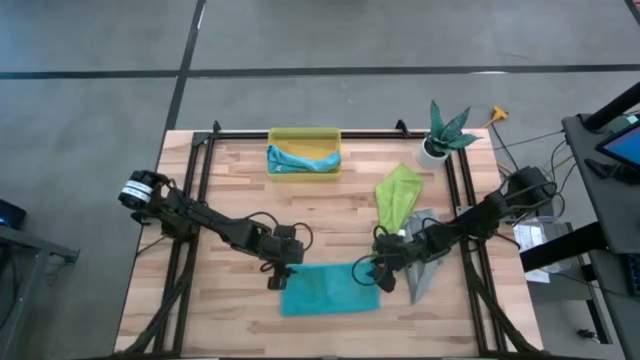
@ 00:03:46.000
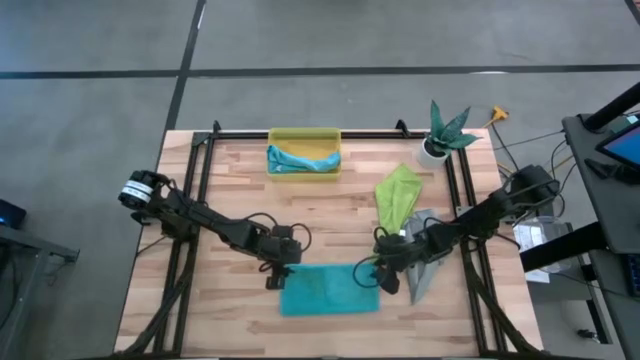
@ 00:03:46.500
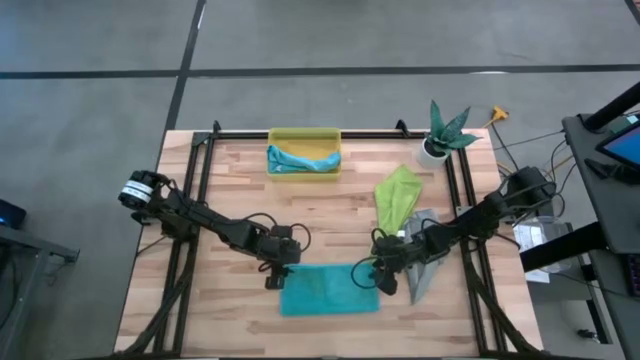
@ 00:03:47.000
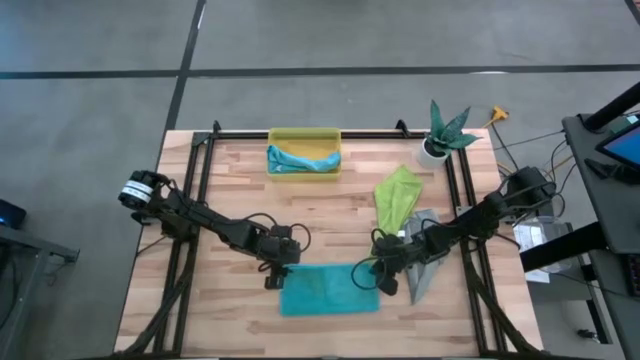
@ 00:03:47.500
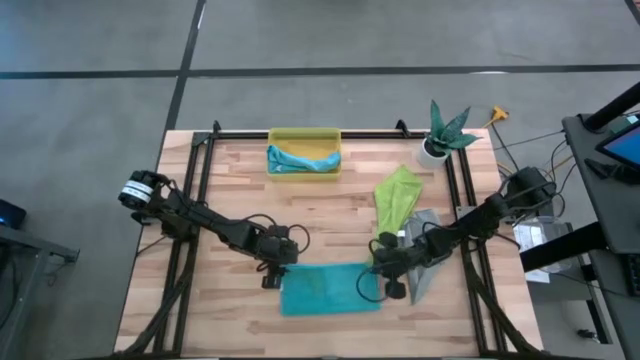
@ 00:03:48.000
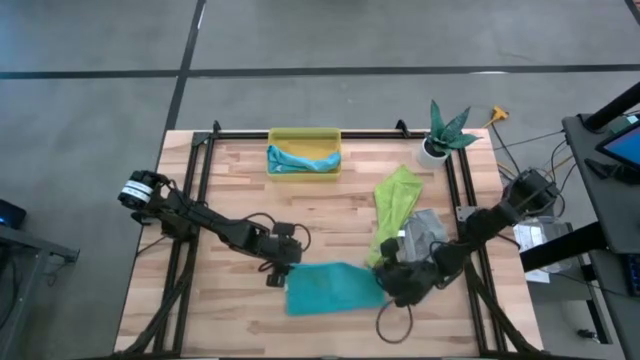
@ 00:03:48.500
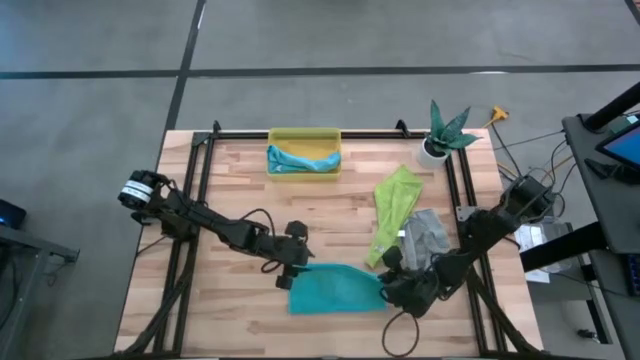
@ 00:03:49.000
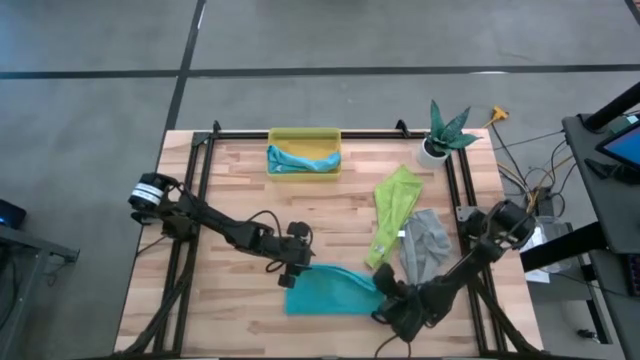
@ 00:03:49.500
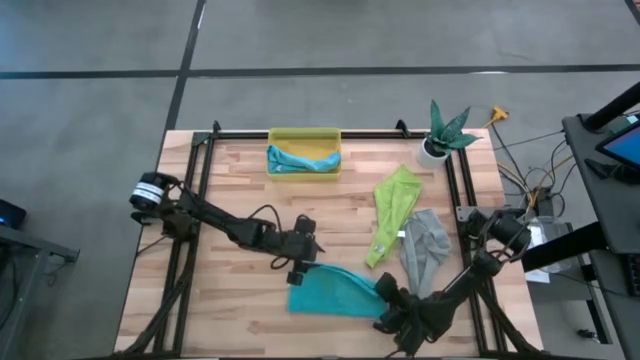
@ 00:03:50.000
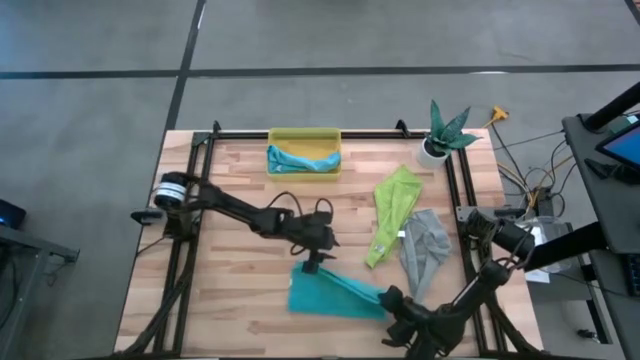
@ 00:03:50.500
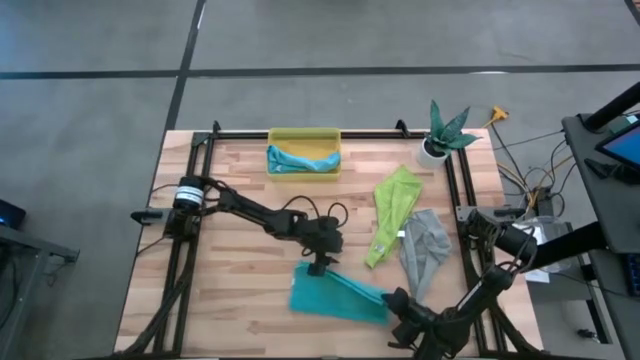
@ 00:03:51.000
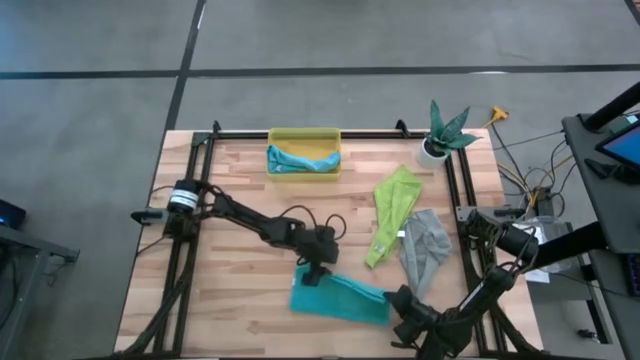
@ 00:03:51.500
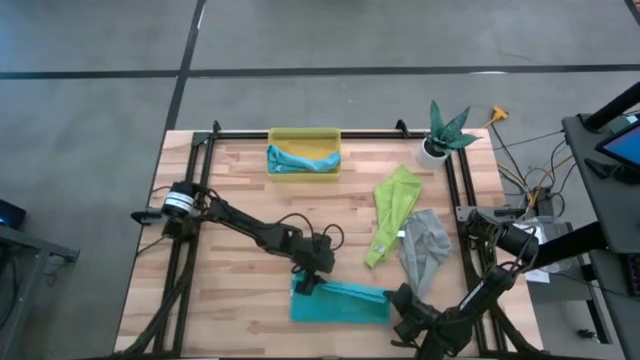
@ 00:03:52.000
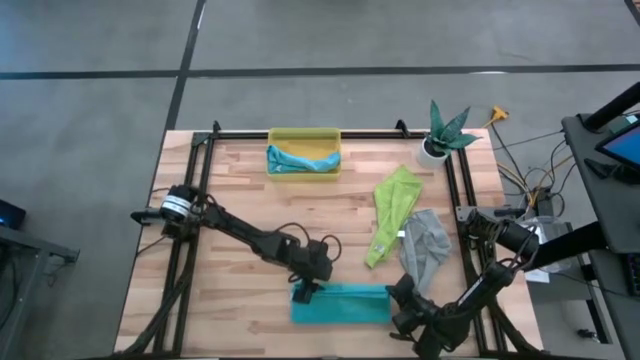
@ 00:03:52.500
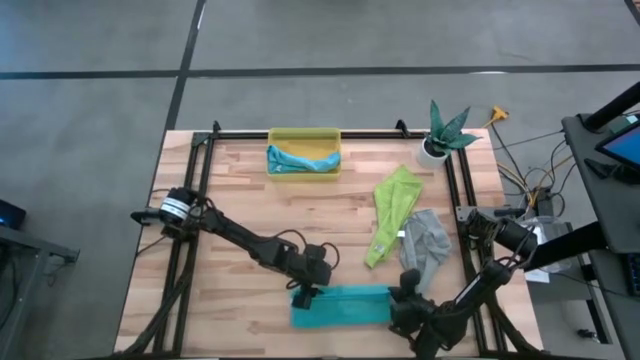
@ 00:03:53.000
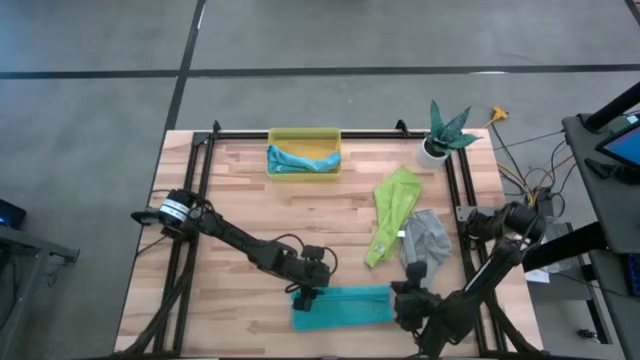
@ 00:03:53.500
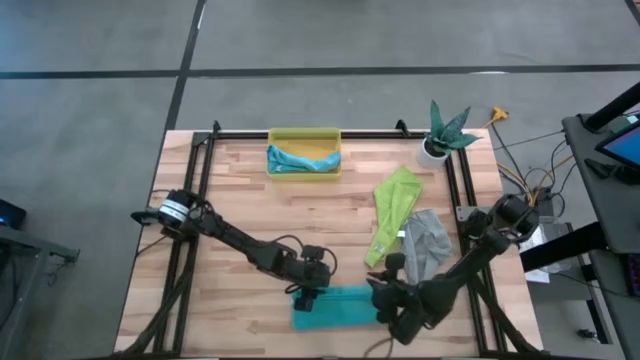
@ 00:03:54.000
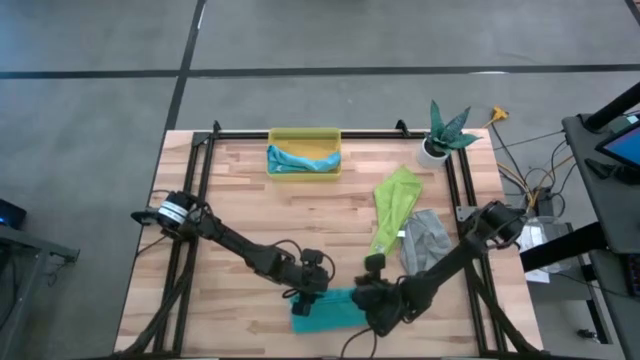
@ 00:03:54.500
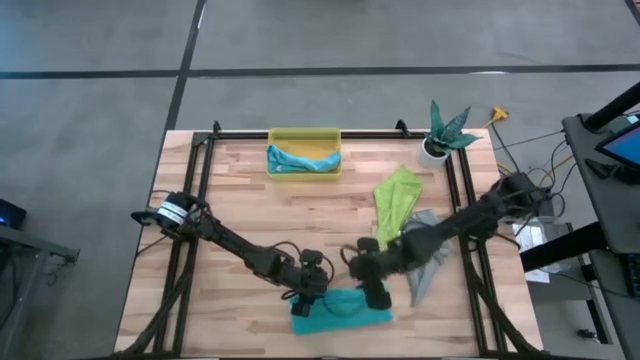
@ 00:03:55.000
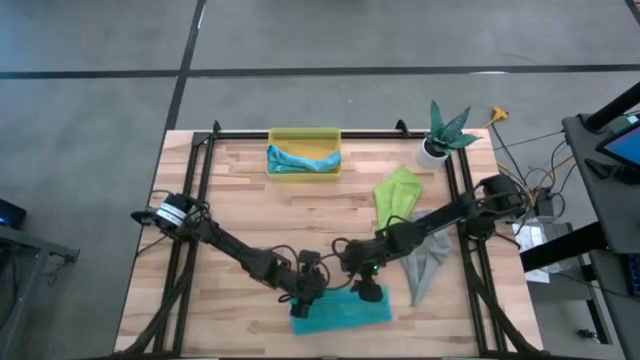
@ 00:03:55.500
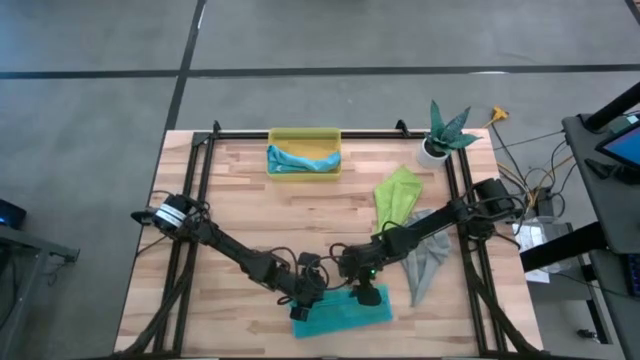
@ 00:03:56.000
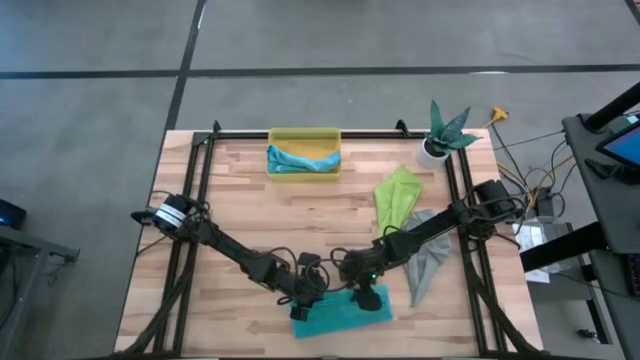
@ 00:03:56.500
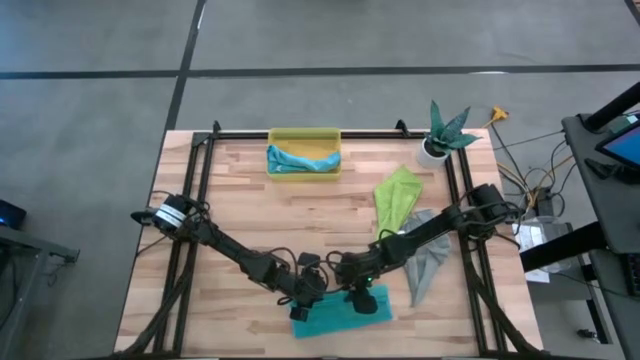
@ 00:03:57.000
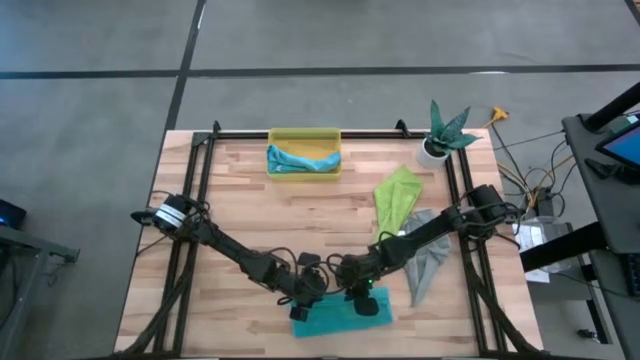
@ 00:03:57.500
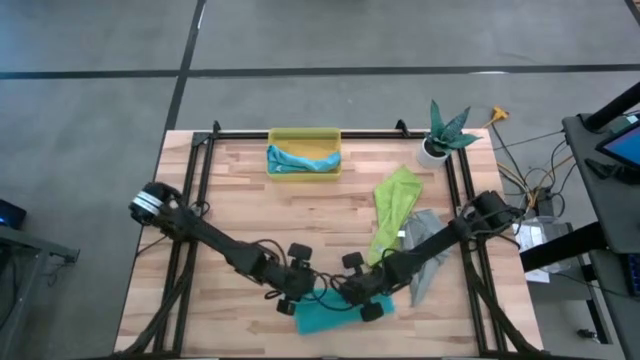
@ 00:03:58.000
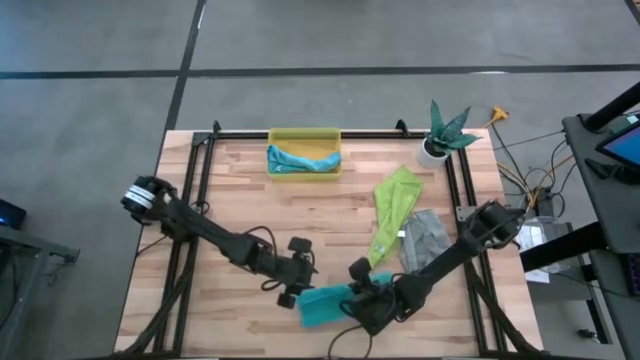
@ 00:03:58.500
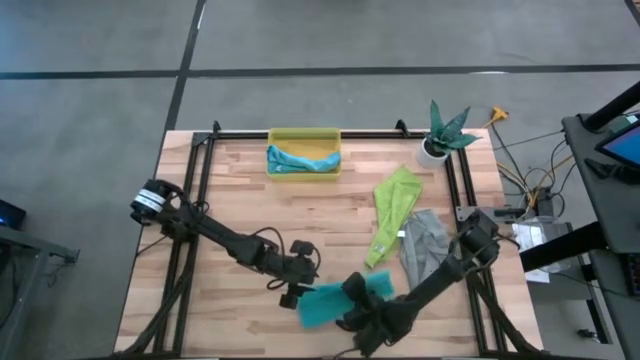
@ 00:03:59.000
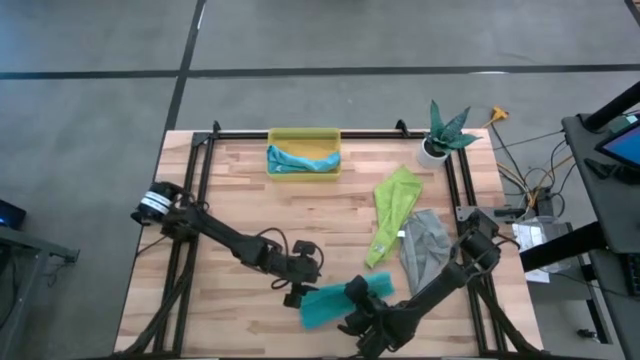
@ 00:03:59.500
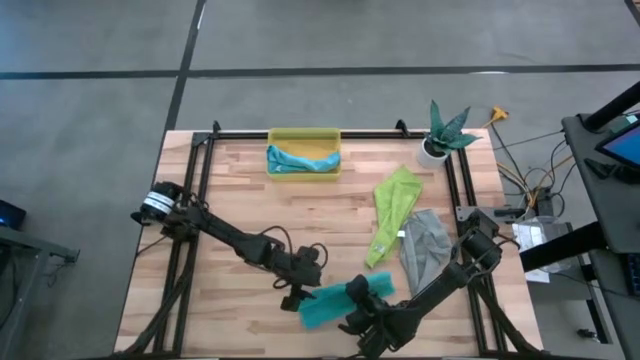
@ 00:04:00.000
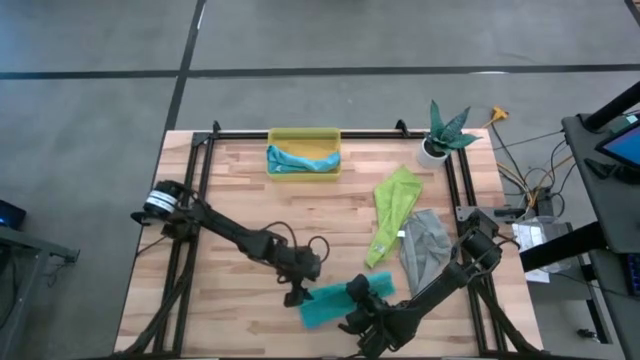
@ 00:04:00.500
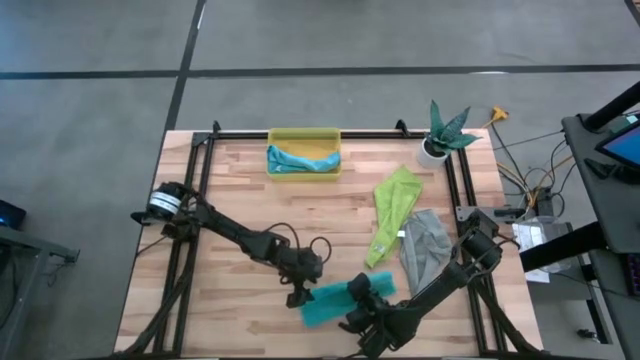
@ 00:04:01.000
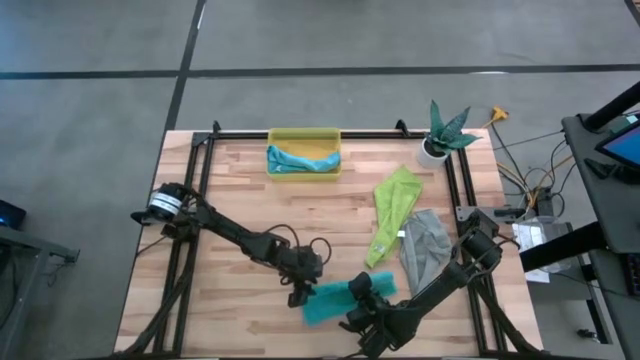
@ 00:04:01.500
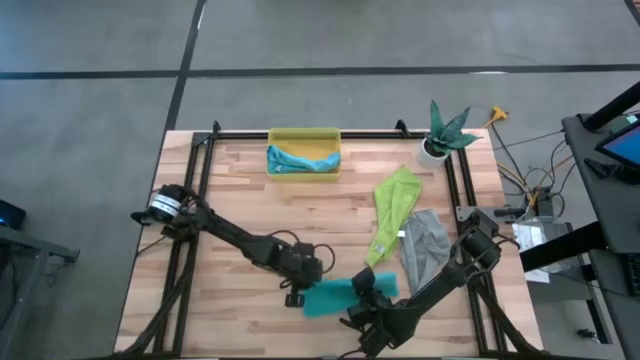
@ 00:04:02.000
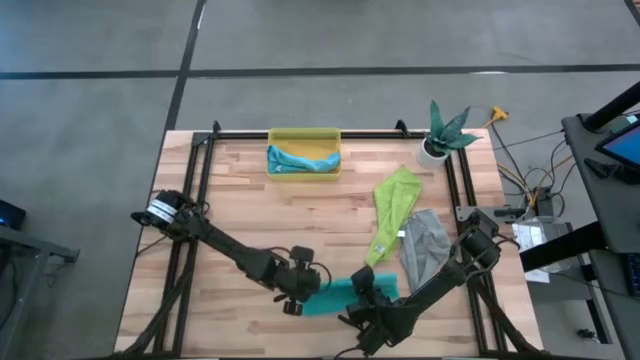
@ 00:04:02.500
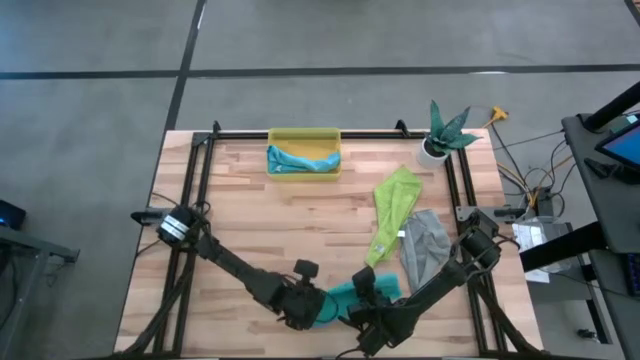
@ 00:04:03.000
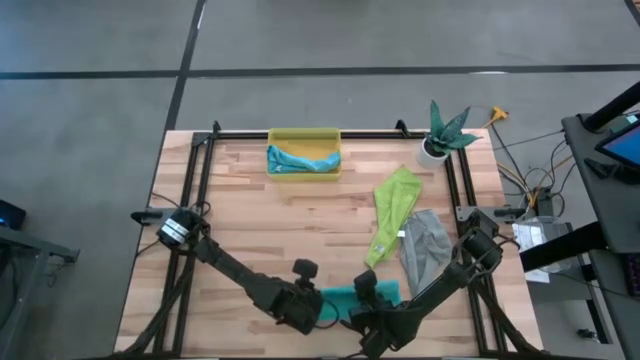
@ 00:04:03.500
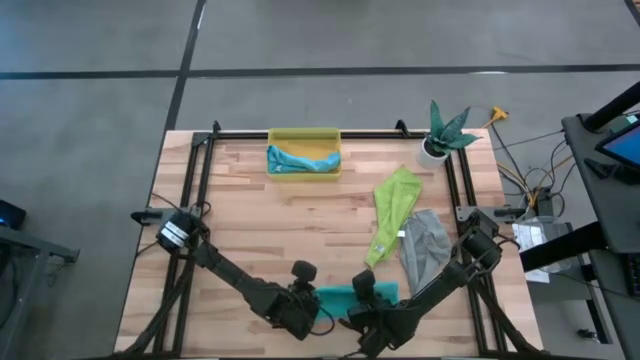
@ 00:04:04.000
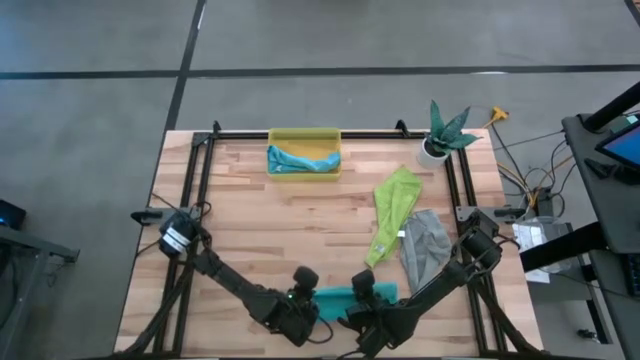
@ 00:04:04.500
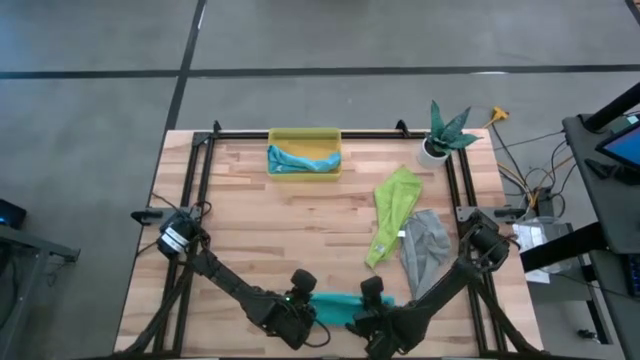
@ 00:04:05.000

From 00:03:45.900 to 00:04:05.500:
Task: Roll microfiber towels into tight, uniform cylinder then place into a basket
Roll the light blue towel
